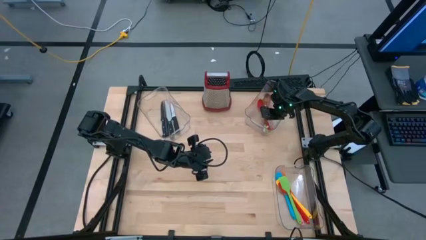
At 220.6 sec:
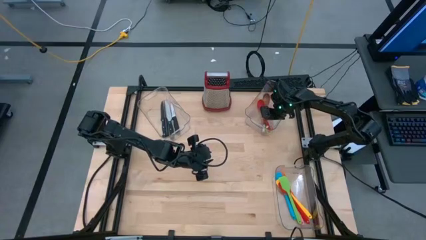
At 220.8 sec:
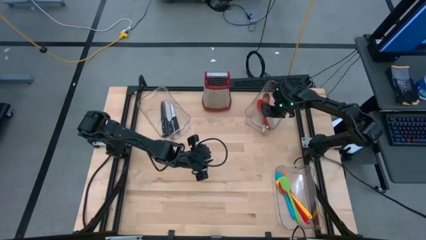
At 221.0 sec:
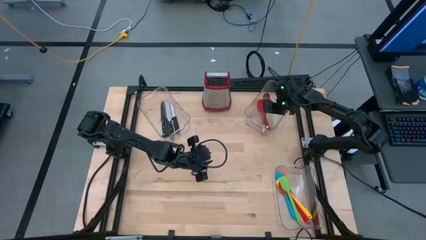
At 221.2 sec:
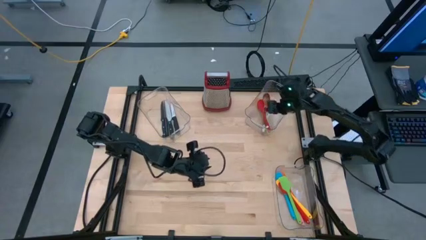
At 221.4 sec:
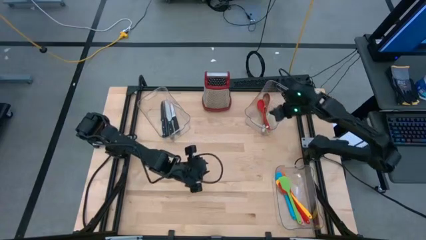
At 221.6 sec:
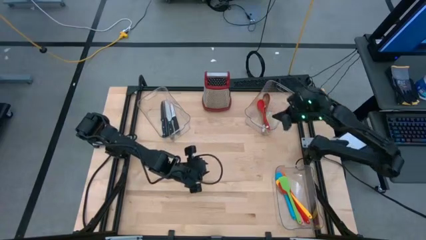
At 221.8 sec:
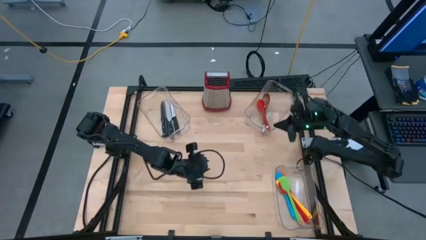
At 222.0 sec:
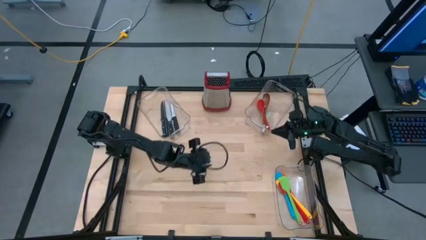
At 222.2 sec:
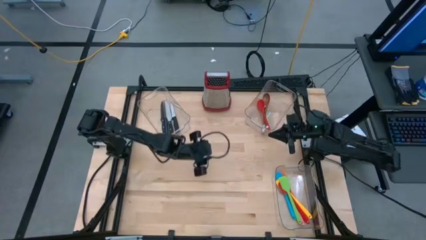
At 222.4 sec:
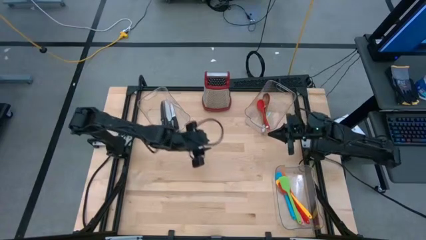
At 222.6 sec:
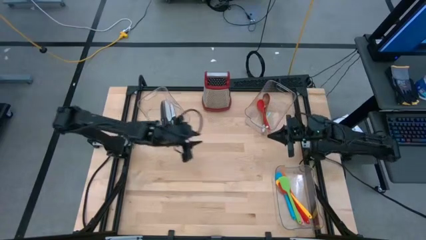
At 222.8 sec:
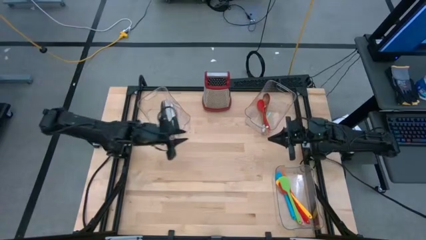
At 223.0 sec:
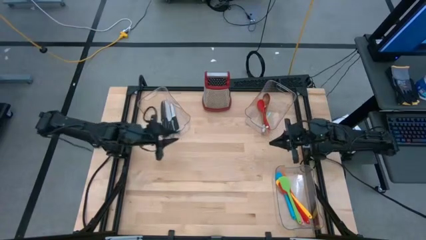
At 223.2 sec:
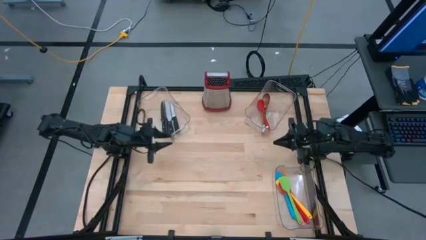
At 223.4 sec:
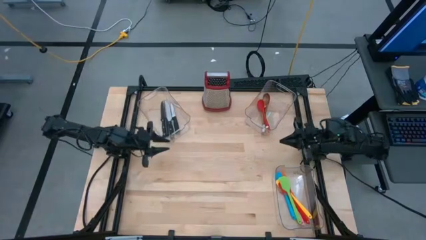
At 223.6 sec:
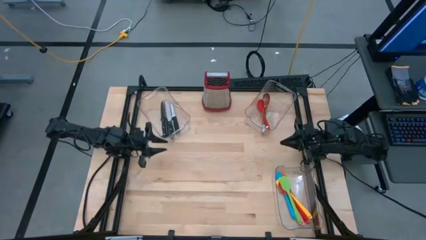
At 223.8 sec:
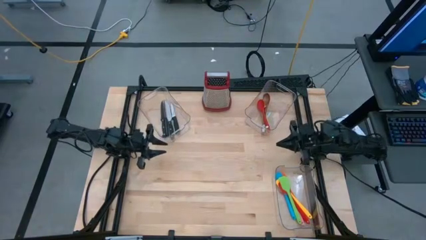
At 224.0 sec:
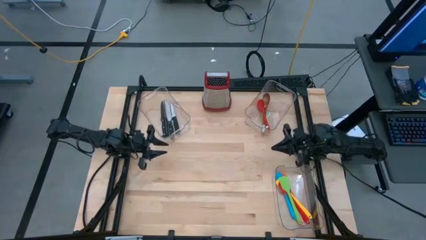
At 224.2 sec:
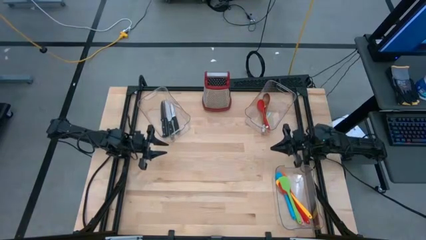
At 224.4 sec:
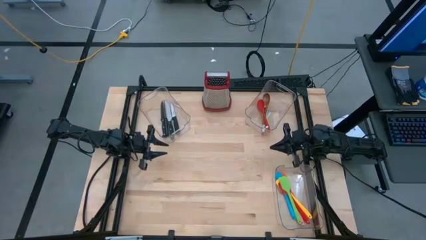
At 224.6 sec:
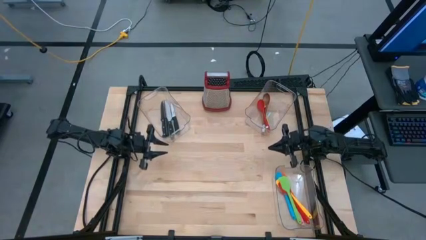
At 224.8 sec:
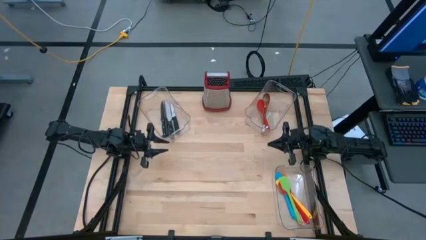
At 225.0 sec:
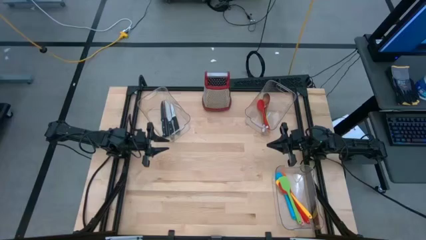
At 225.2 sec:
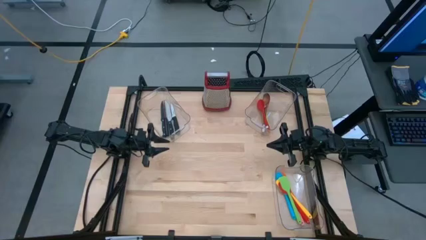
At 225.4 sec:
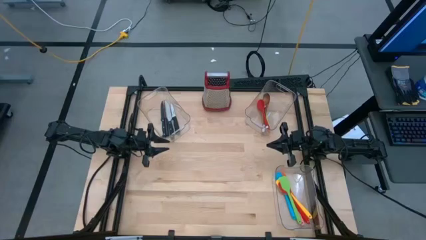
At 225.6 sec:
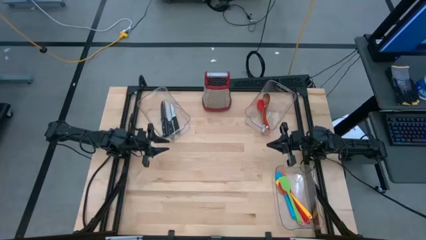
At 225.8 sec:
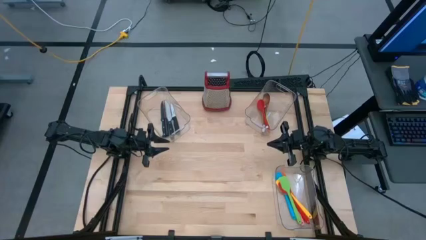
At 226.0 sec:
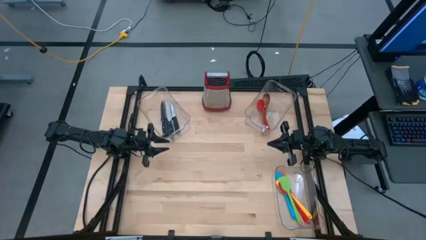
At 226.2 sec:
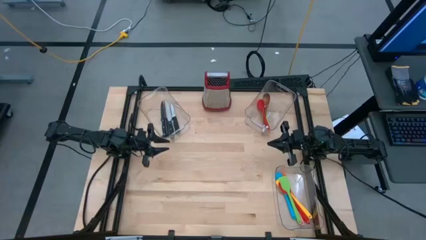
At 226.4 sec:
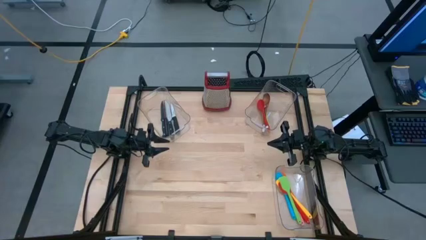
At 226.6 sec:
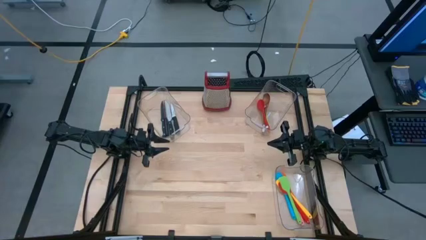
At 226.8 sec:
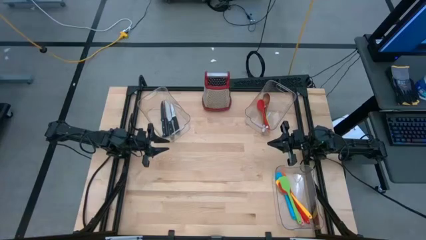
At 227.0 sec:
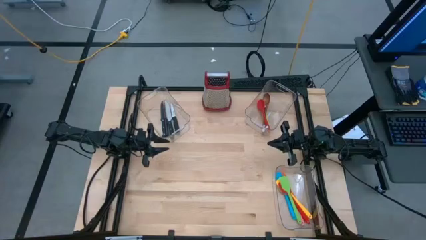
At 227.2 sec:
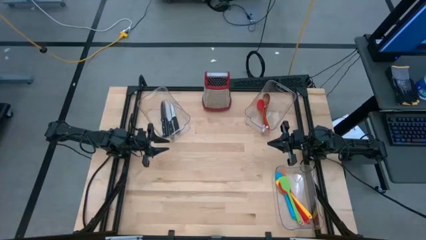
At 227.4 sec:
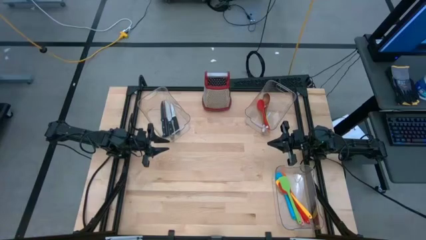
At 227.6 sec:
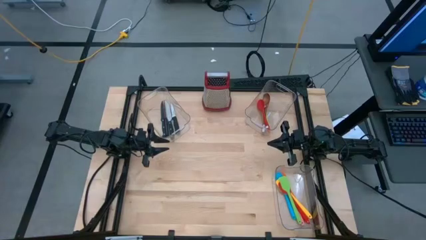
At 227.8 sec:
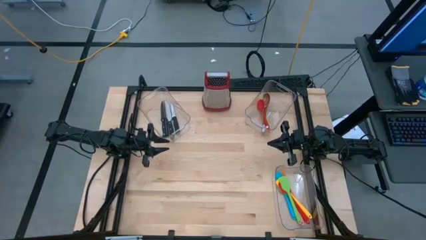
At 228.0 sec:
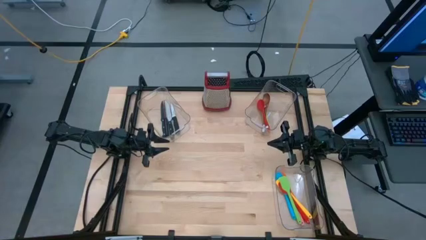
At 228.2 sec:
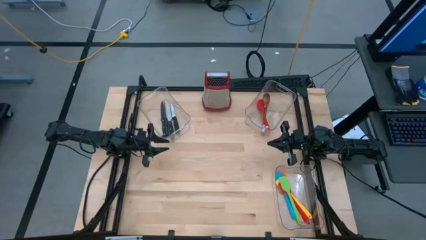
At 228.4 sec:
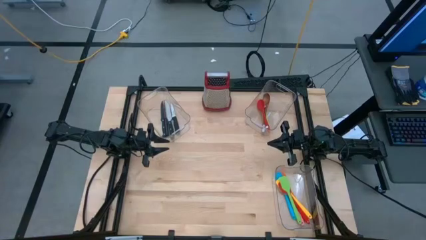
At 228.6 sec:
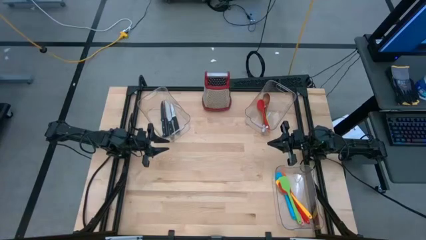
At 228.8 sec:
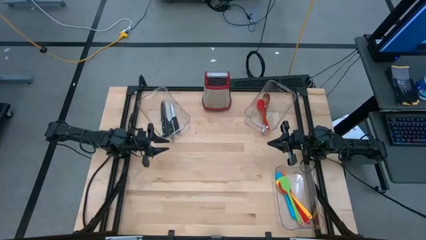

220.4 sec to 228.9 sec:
Task: Pick & Place Kitchen Items
Return to Home Position

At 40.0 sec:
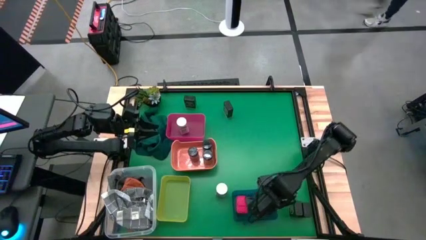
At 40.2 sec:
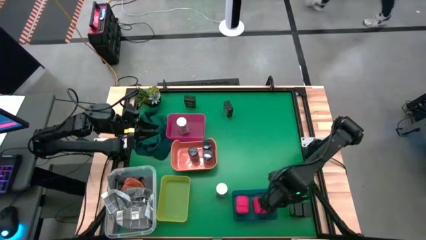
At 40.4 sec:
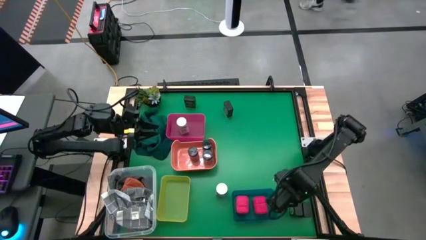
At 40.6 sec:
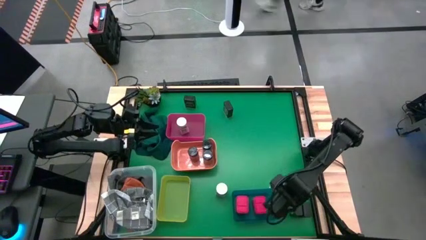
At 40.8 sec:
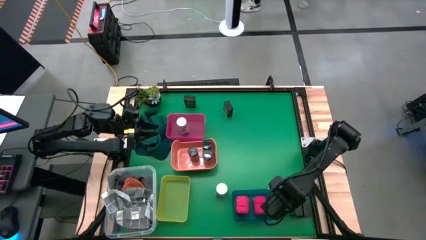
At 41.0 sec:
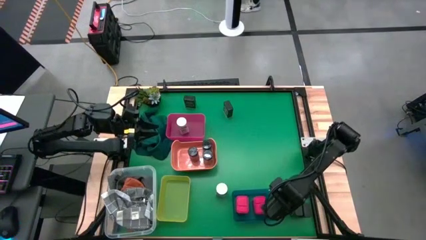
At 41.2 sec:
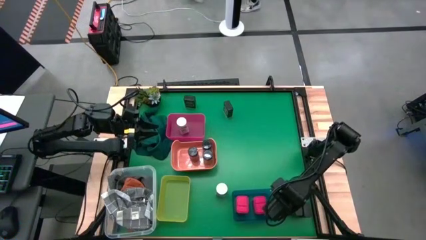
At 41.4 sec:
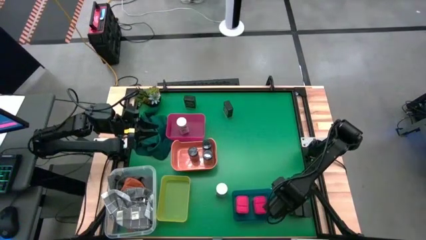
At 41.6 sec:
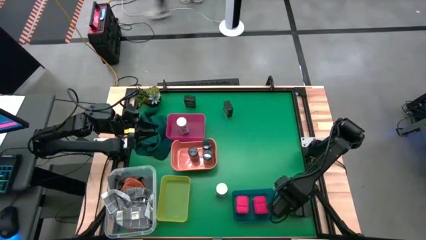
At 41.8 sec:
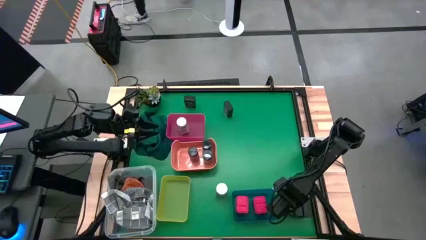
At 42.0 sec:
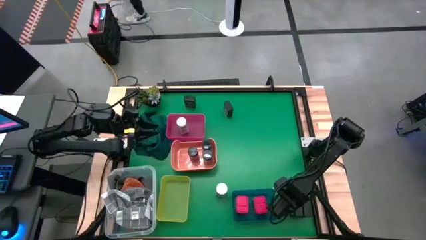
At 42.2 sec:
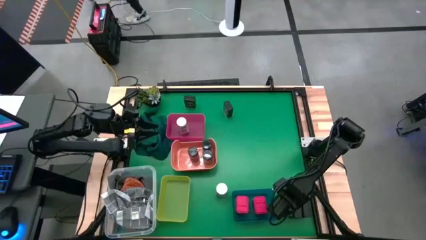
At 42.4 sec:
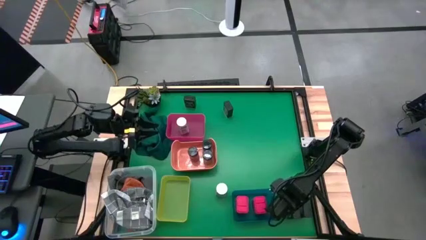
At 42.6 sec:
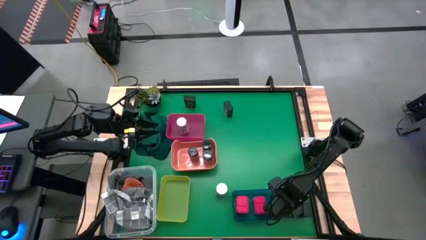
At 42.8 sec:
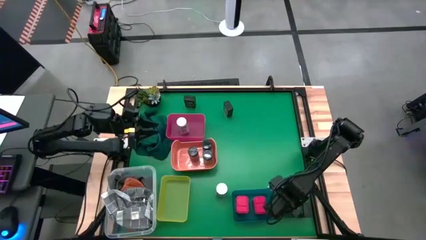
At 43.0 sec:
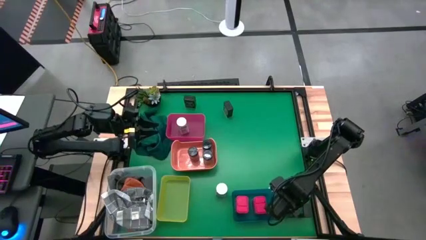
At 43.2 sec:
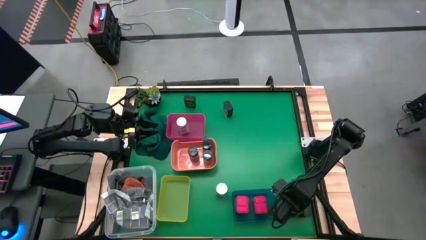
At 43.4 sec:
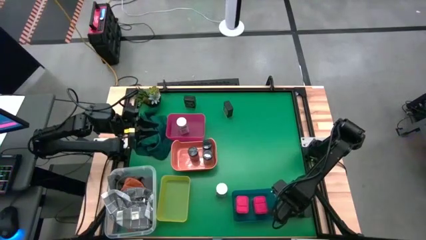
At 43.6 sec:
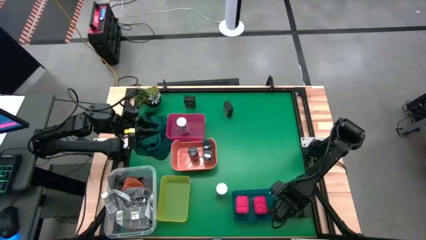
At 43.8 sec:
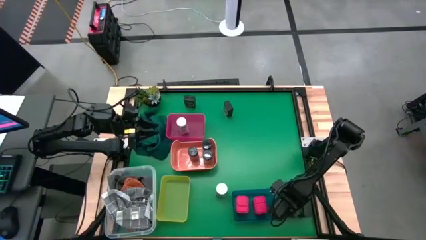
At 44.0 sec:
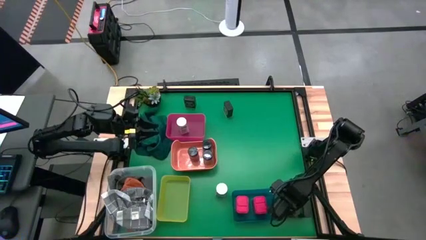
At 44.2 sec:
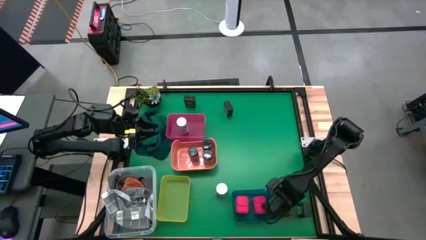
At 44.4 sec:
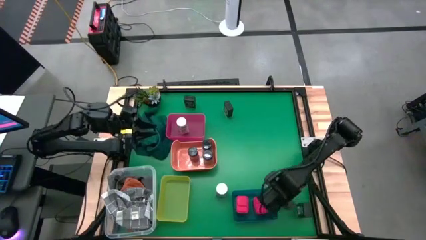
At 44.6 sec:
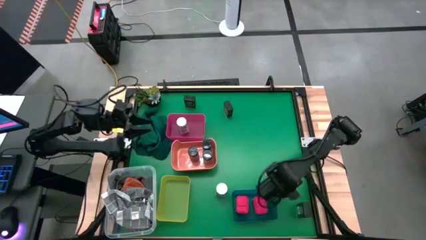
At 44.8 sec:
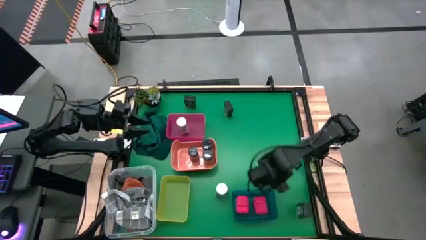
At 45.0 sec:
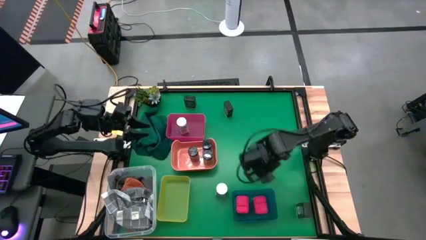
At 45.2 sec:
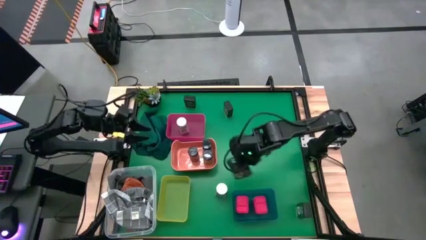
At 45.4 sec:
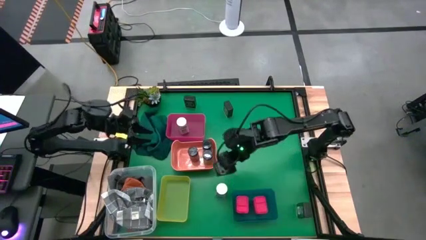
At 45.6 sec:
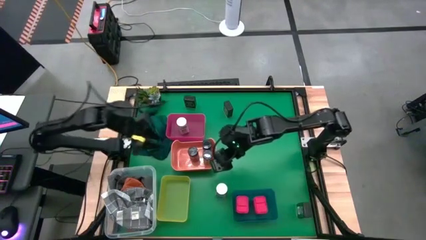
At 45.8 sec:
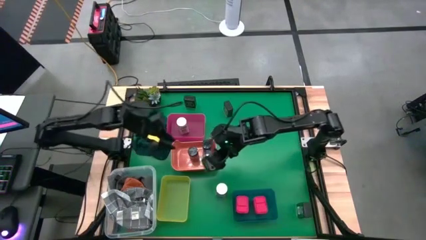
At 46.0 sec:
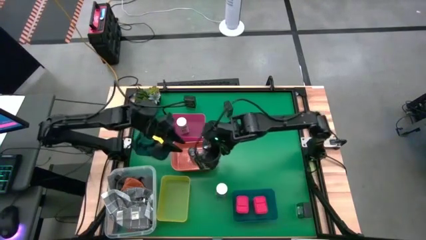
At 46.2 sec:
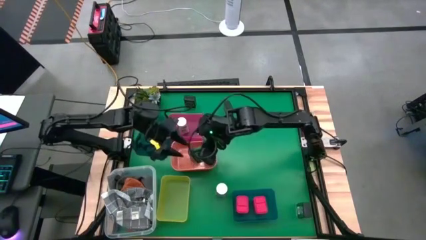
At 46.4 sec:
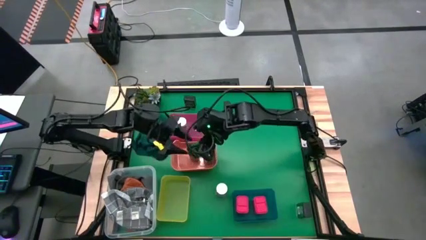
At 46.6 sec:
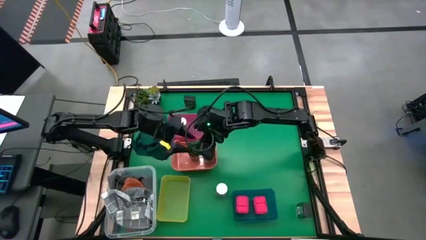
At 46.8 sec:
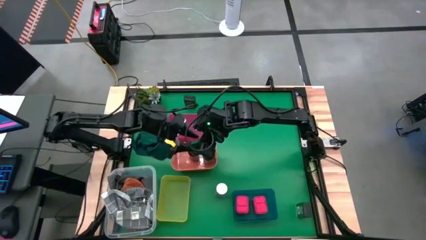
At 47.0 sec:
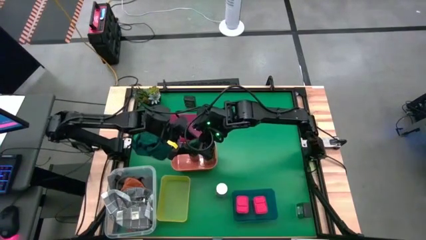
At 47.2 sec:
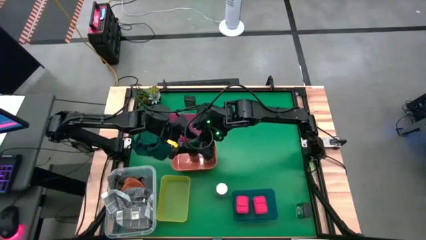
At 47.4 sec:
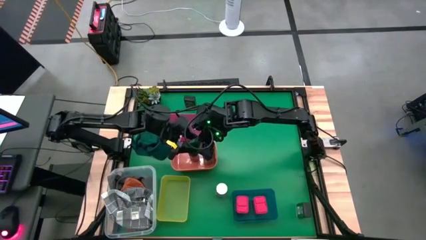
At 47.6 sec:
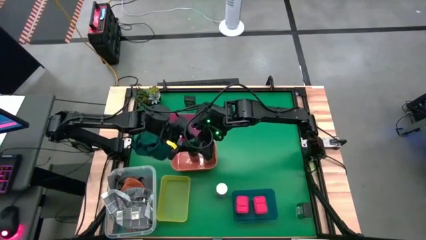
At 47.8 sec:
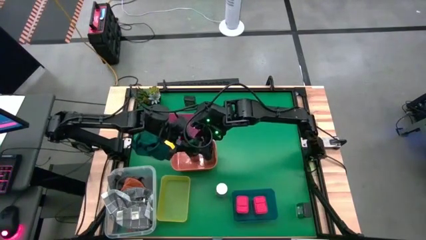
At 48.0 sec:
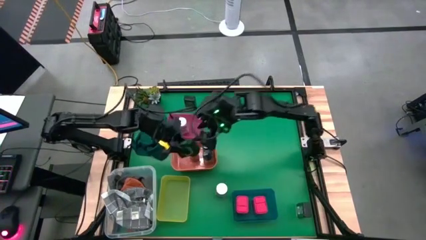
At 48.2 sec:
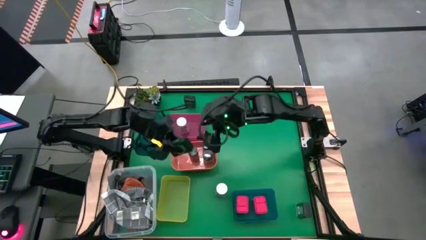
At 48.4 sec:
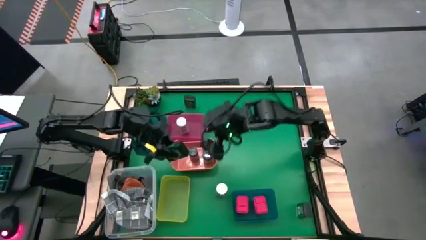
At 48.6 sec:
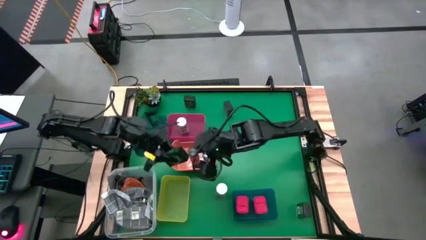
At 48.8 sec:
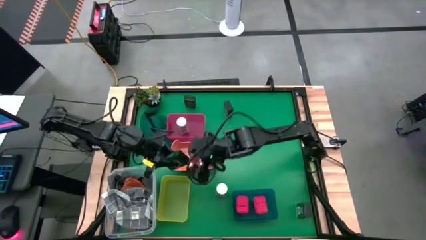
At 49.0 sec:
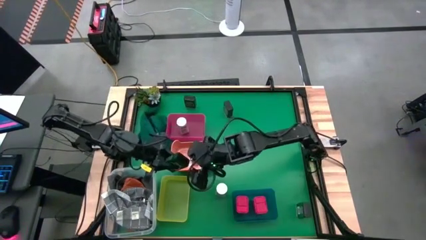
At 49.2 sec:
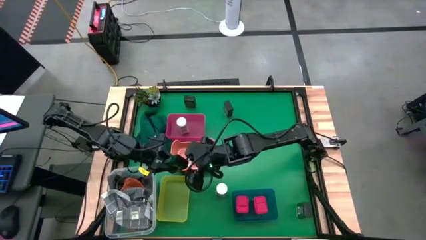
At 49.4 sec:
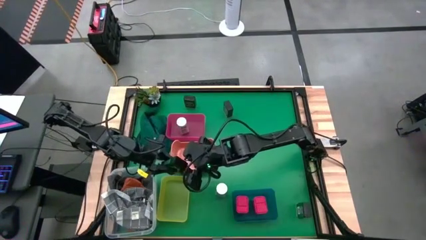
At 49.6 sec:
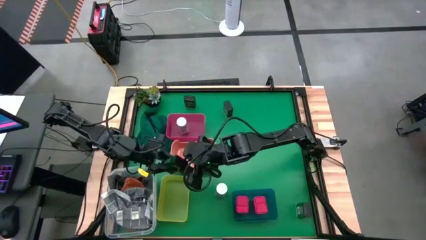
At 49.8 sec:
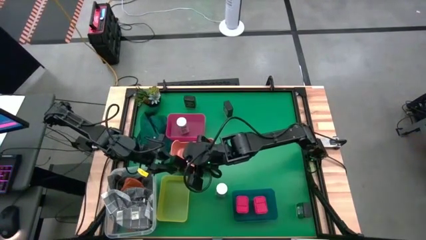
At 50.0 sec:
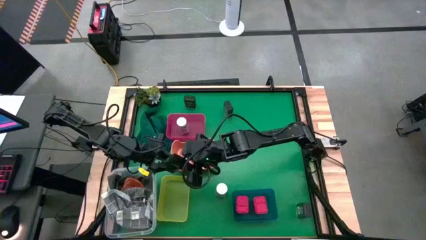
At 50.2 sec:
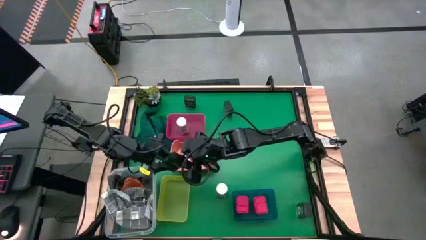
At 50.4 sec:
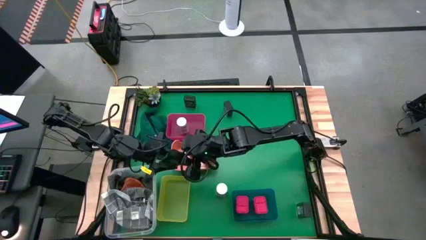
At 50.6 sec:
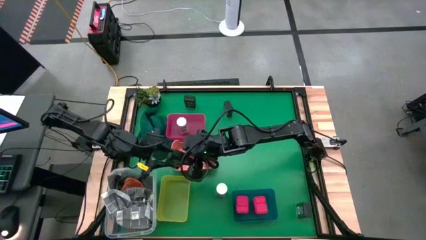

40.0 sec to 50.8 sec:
Task: Sort spices by type
Put the bottom left green seasoning can into the yellow bin
